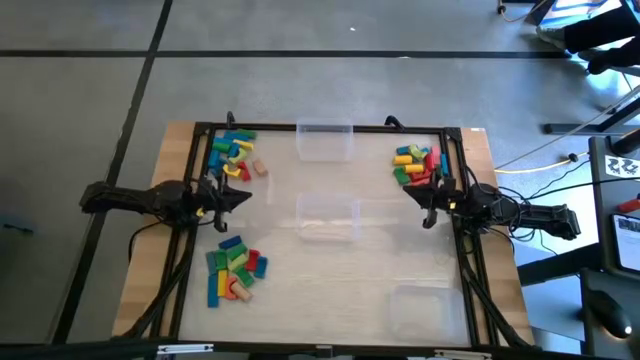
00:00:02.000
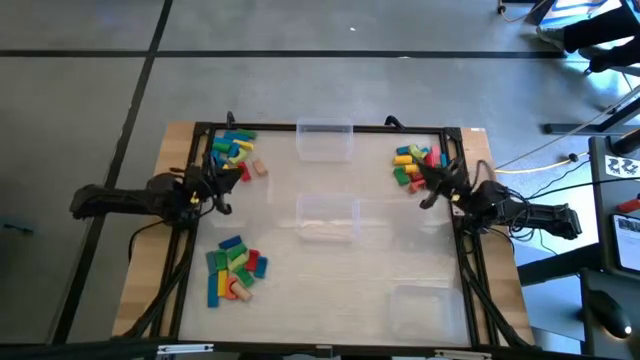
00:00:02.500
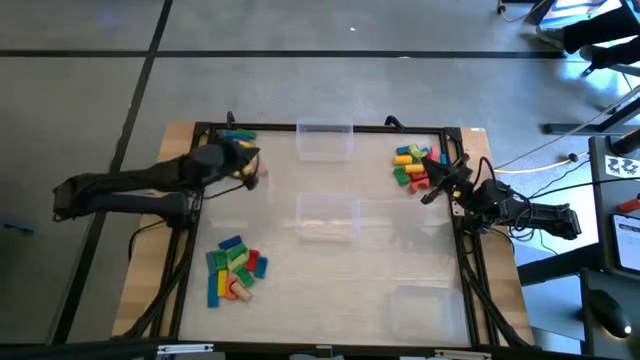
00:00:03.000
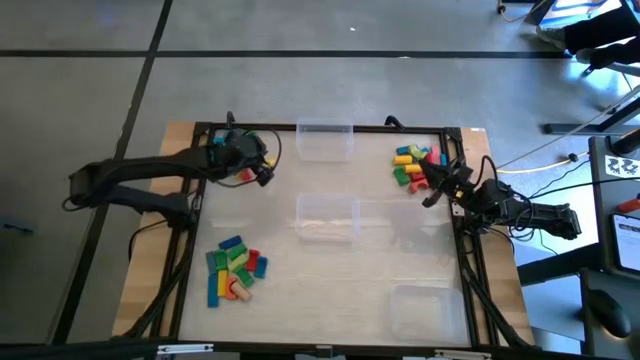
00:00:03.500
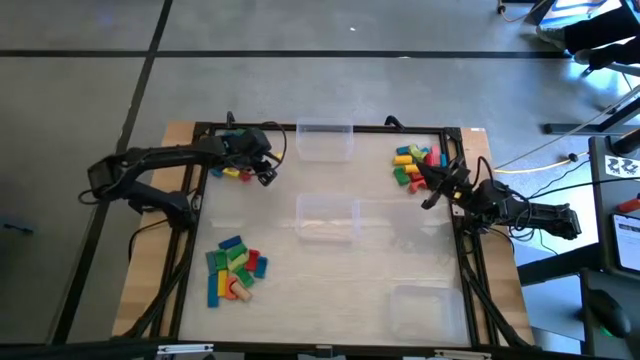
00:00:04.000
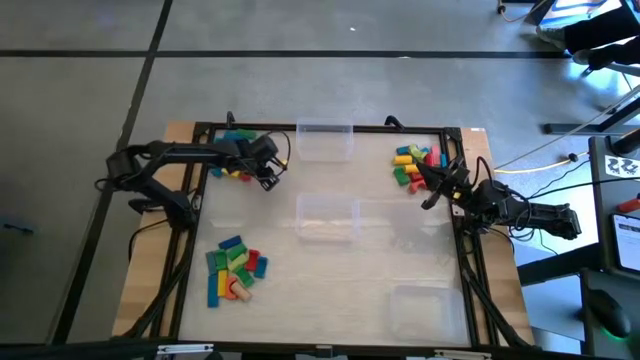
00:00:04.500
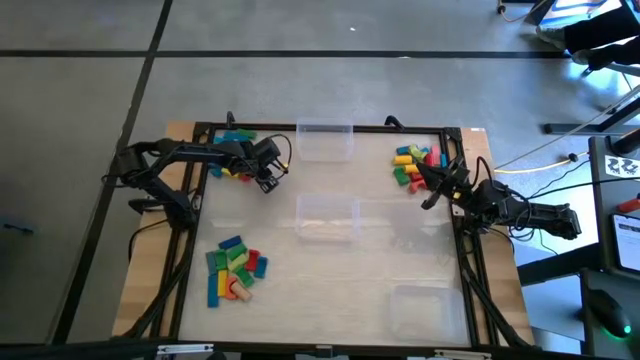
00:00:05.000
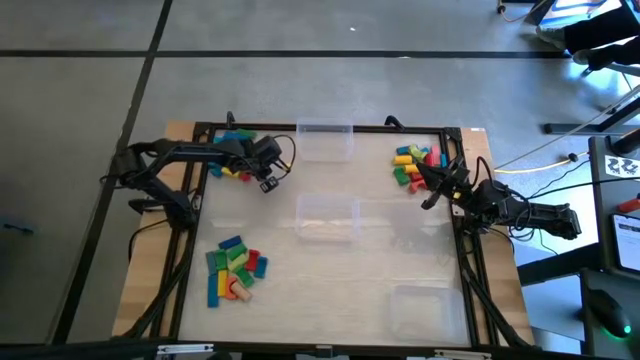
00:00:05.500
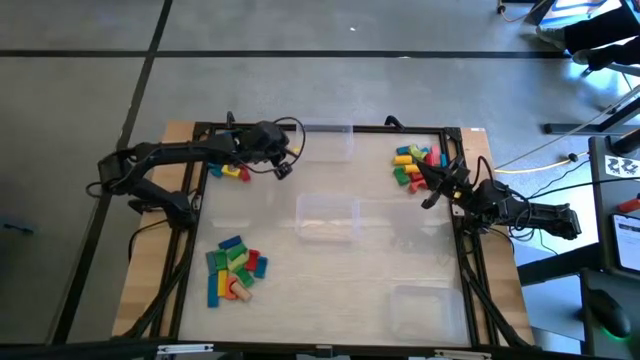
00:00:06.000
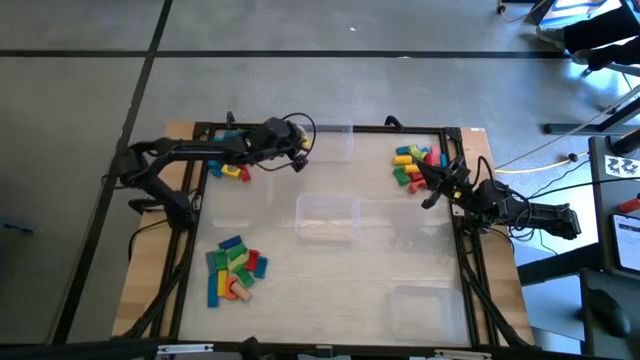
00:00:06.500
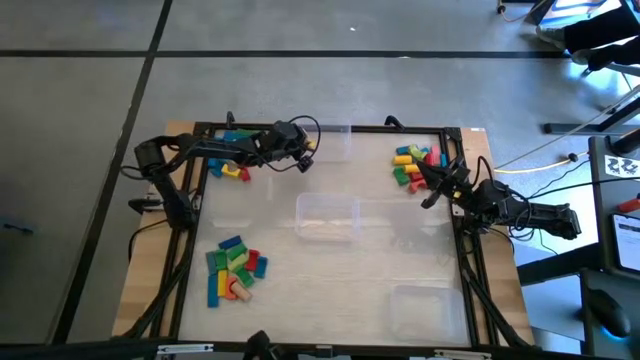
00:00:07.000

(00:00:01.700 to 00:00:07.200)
Task: Sort blocks by size
Put the brown arch block into the top transparent bin

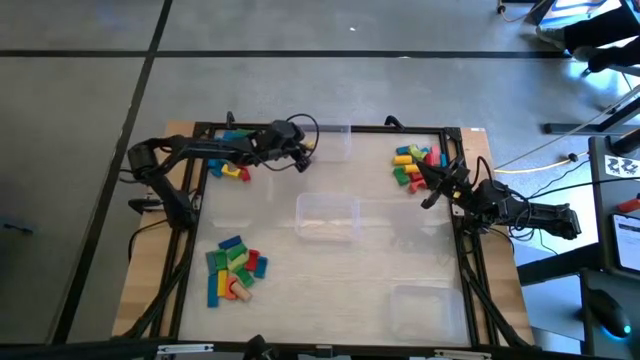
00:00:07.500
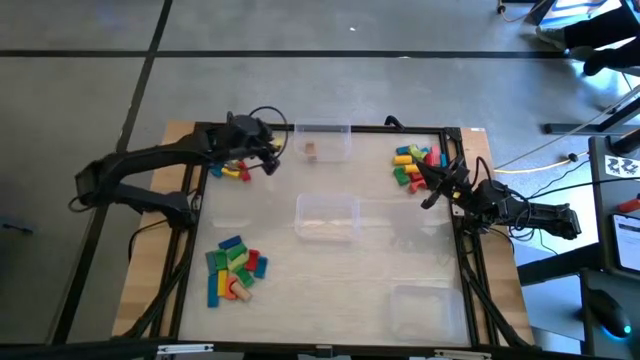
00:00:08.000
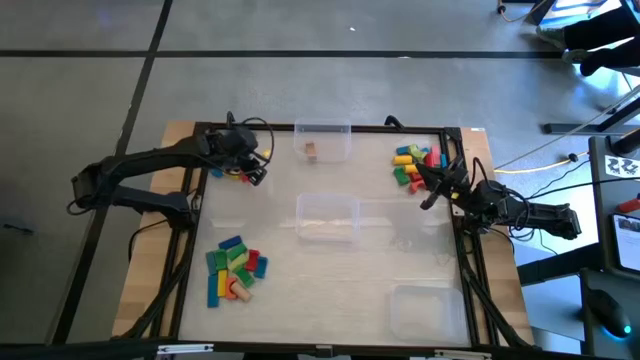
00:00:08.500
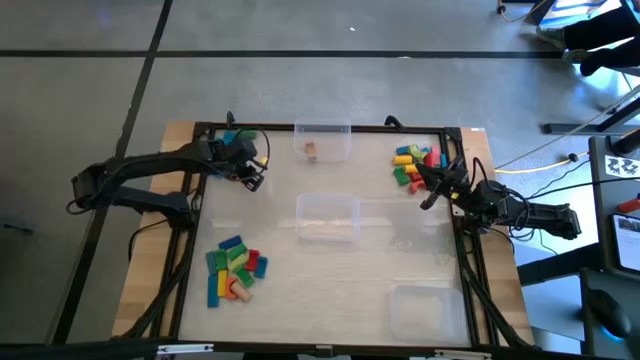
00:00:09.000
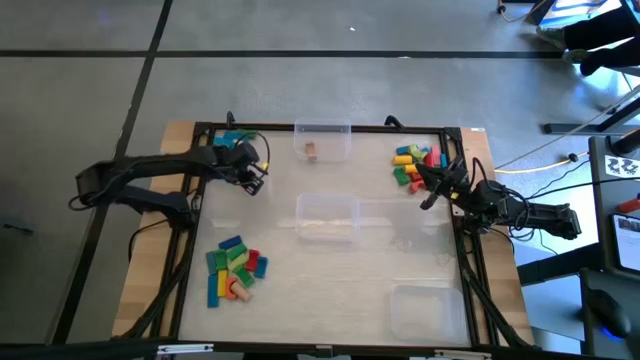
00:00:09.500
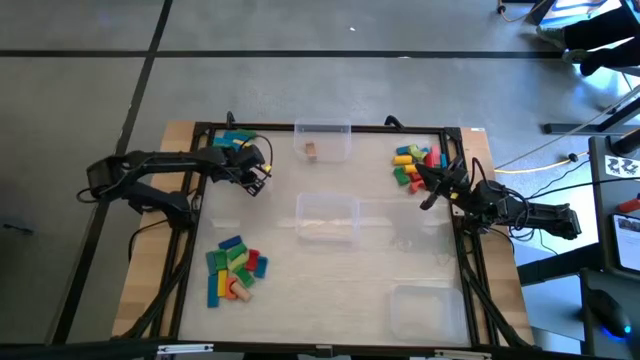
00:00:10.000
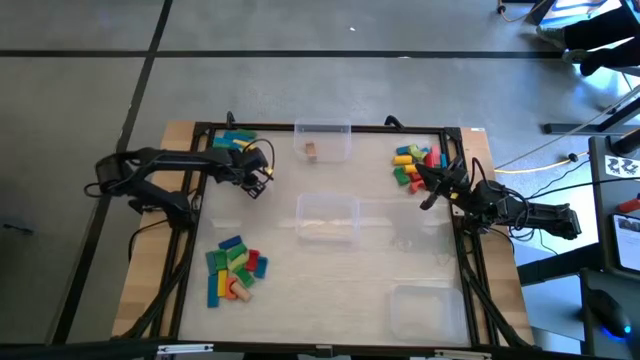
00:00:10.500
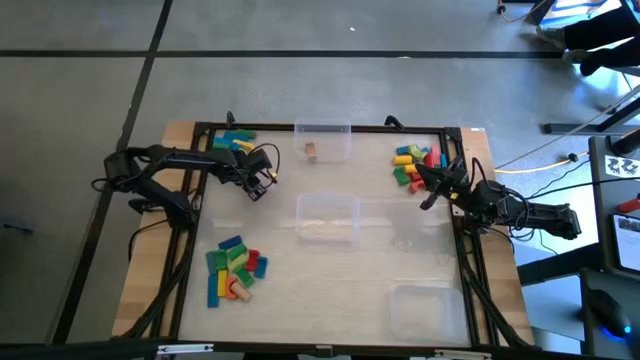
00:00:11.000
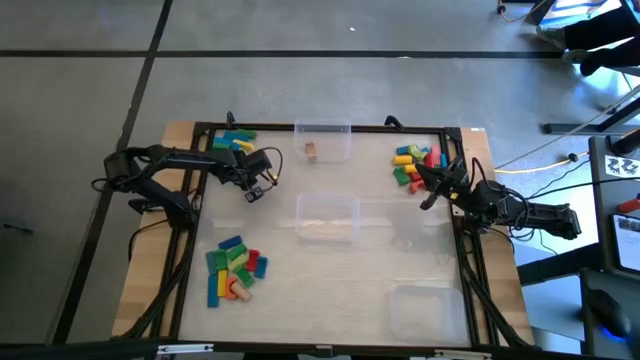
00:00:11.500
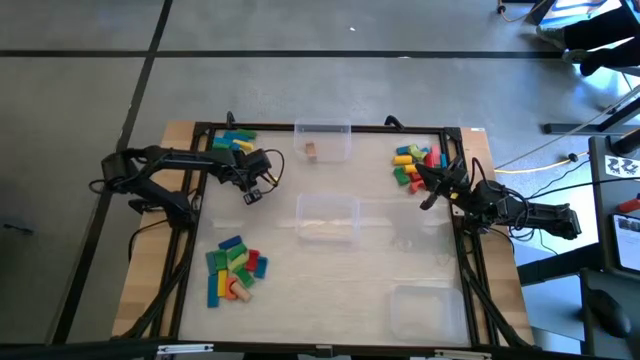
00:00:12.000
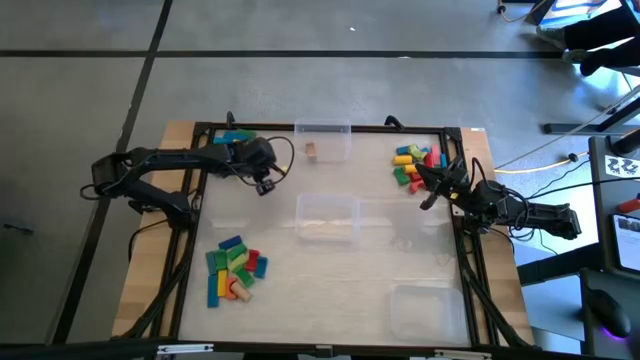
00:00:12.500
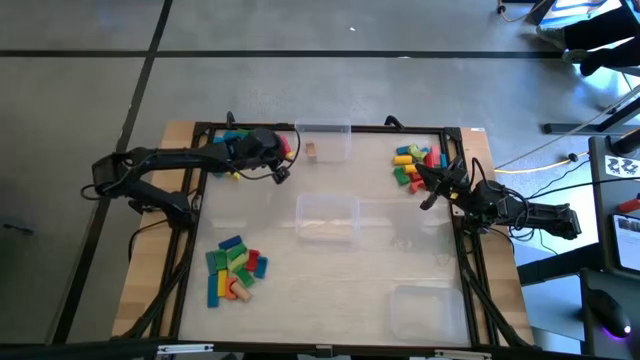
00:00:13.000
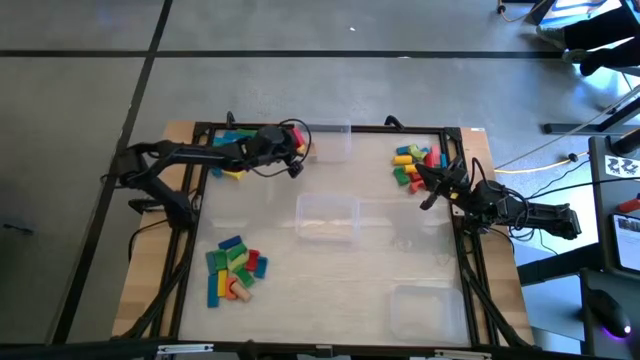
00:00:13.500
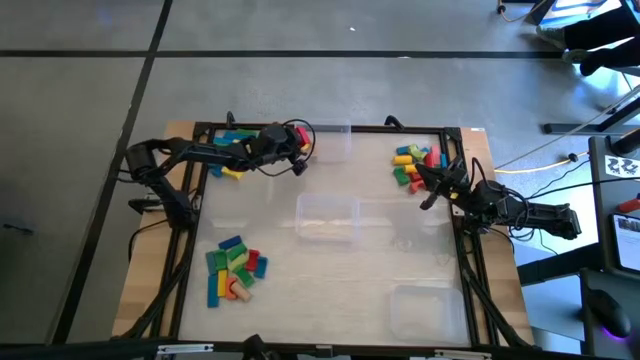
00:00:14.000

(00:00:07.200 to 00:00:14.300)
Put the red arch block into the top transparent bin

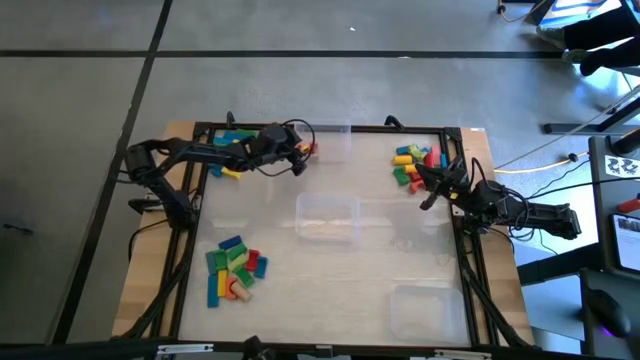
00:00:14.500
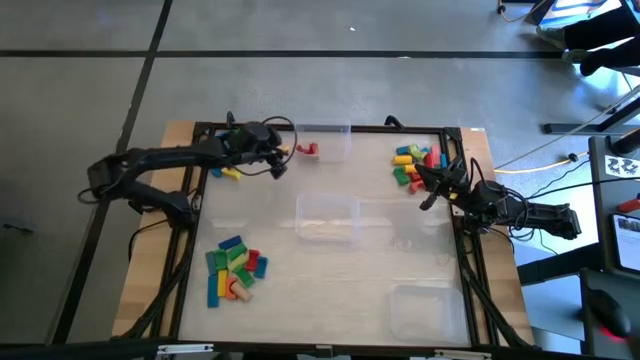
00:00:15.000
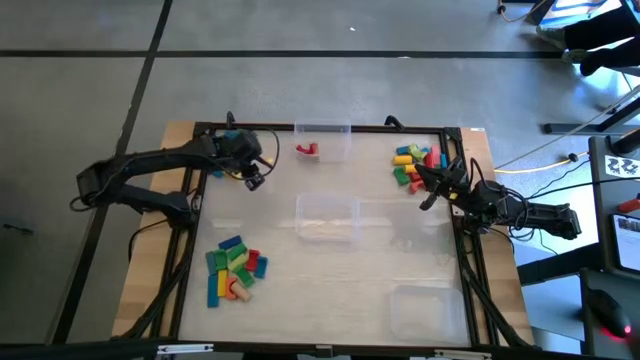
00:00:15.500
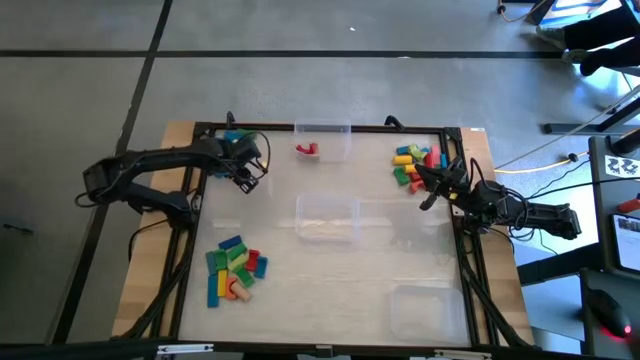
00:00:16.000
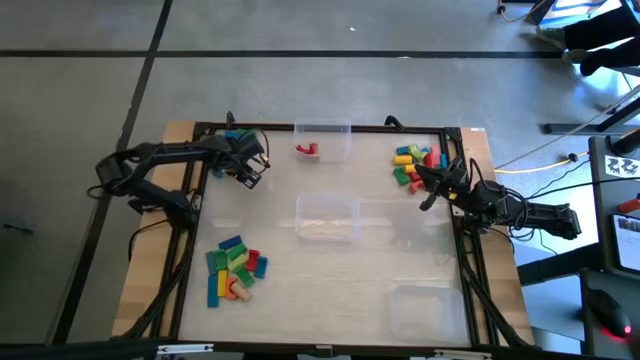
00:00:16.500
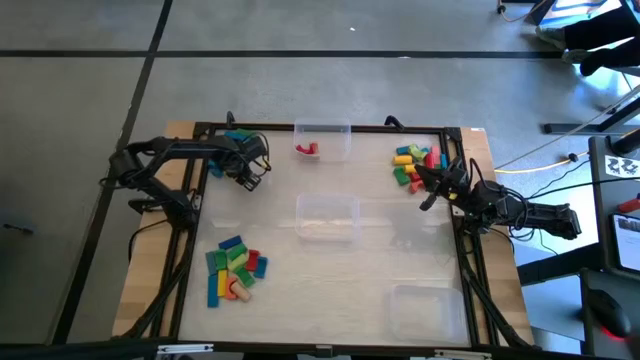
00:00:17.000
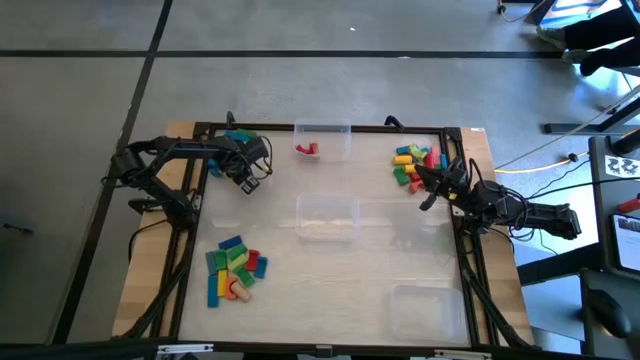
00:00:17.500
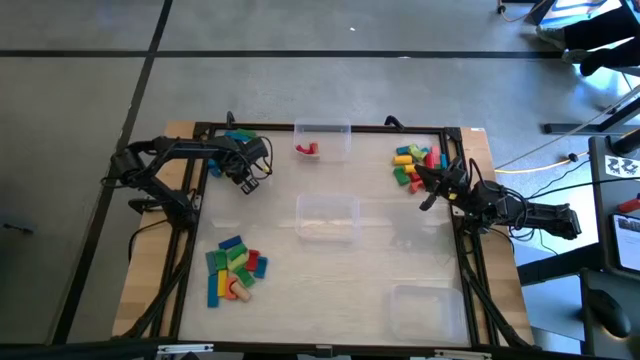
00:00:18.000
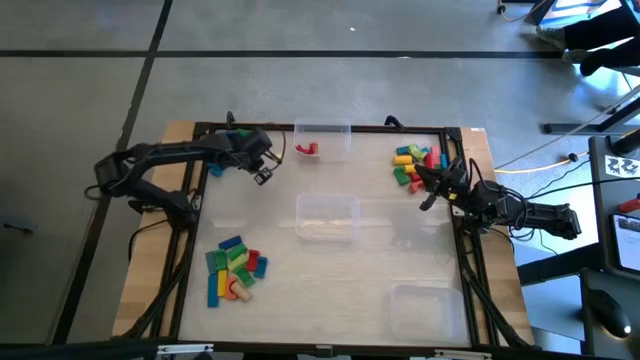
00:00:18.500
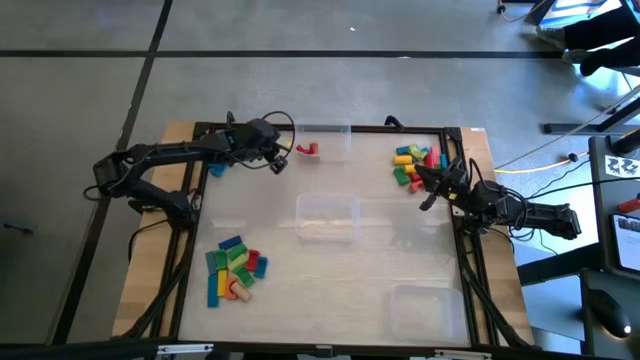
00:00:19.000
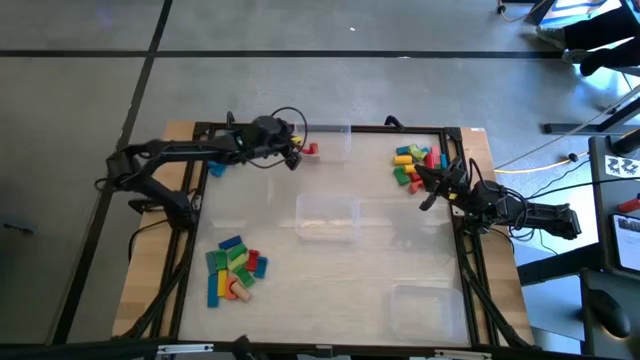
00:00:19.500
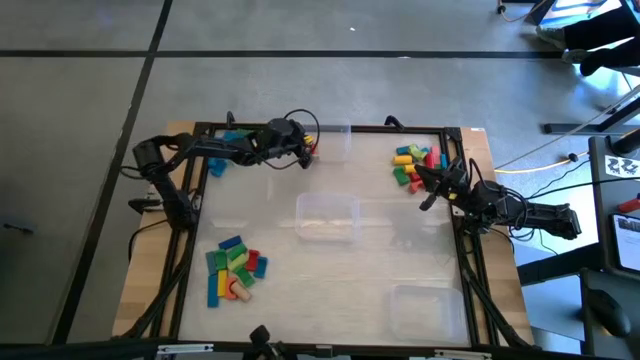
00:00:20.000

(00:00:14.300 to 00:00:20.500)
Put the yellow arch block into the top transparent bin

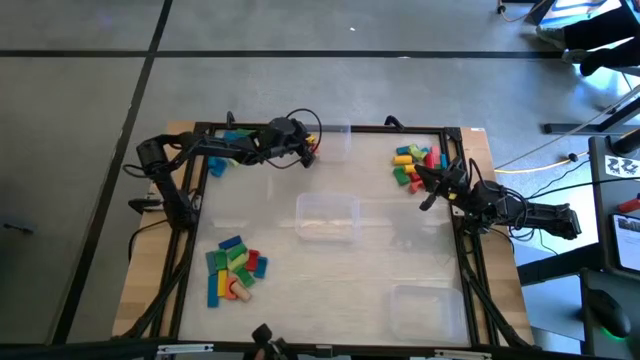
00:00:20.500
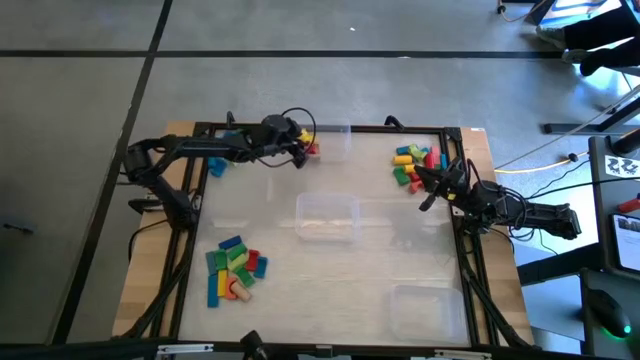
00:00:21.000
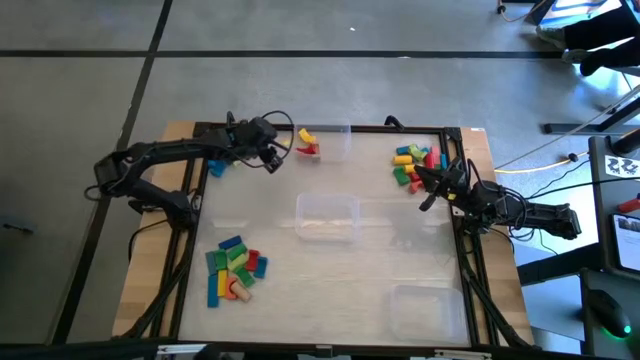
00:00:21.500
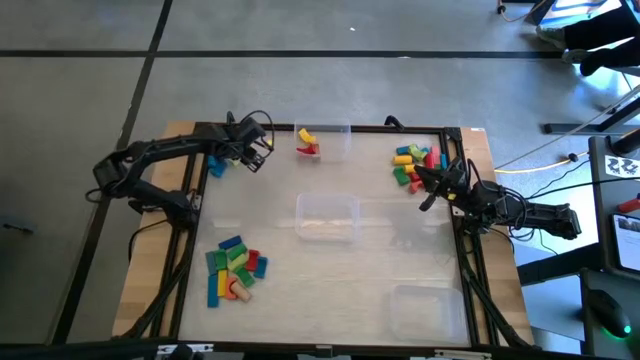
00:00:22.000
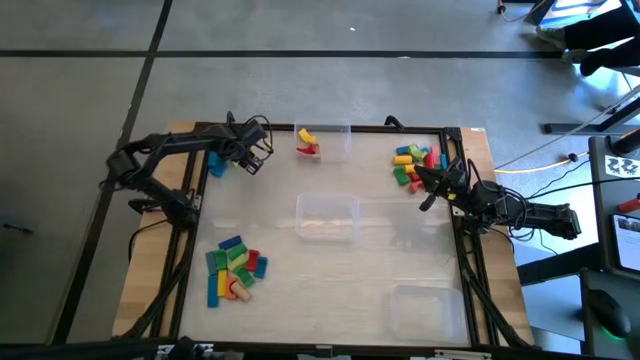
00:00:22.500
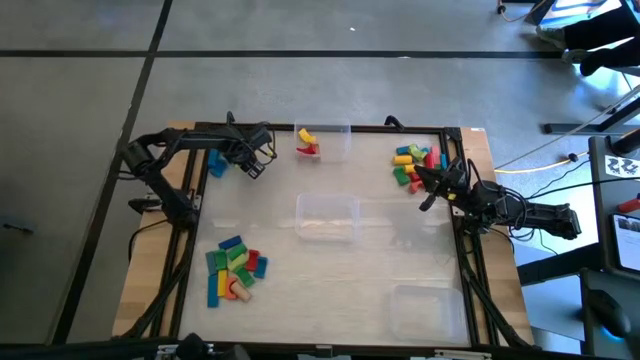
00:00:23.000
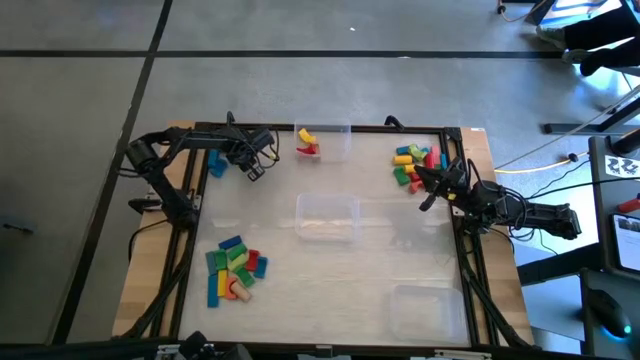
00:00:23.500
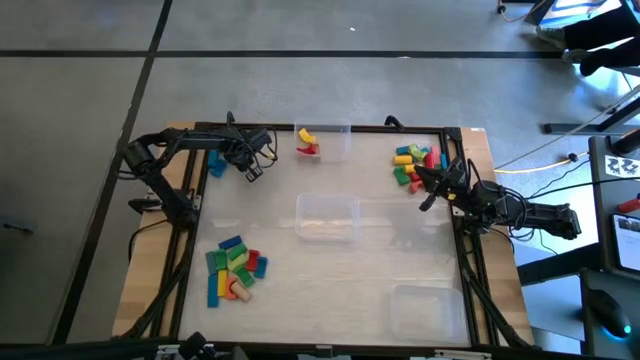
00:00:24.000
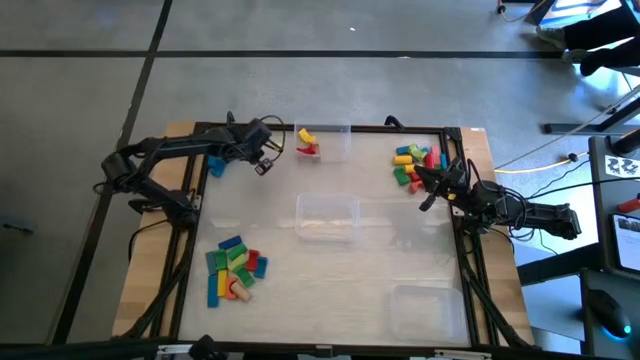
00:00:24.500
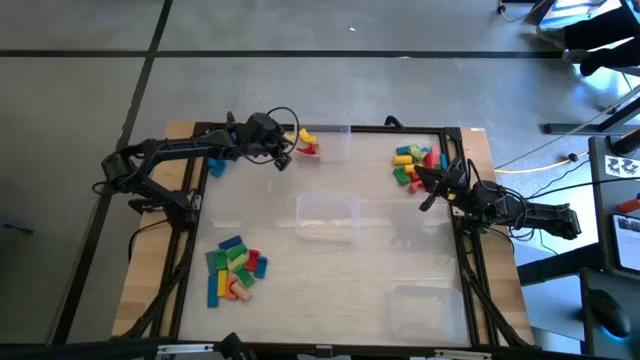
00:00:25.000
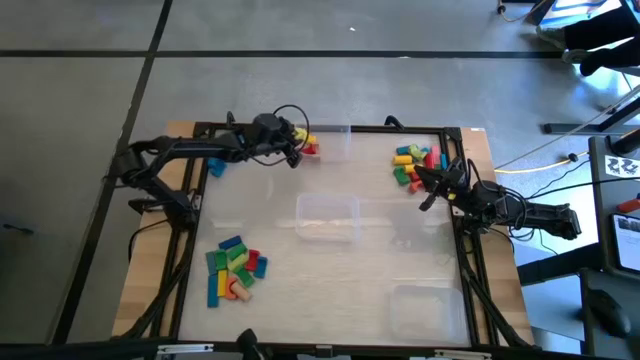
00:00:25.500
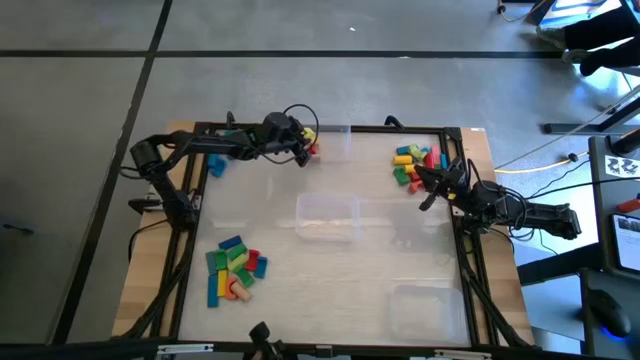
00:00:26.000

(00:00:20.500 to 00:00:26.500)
Put the light green arch block into the top transparent bin
